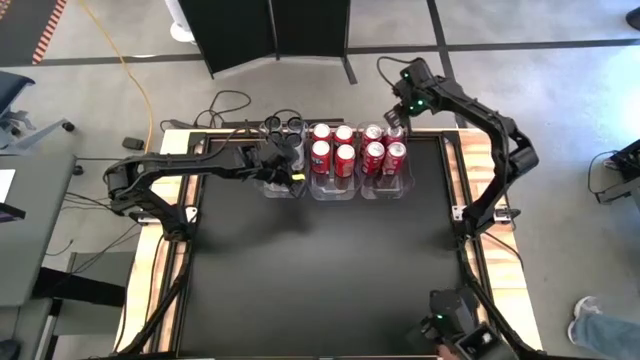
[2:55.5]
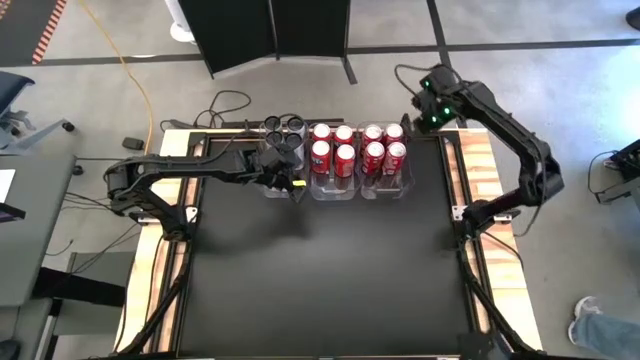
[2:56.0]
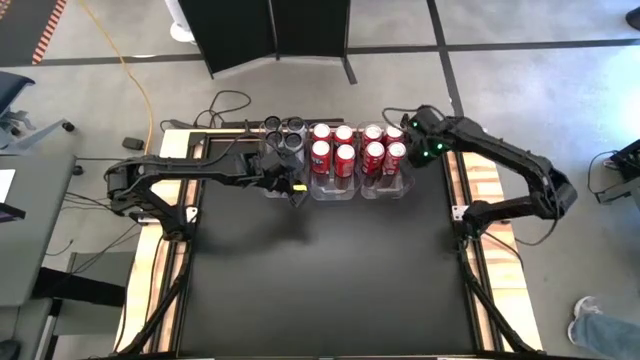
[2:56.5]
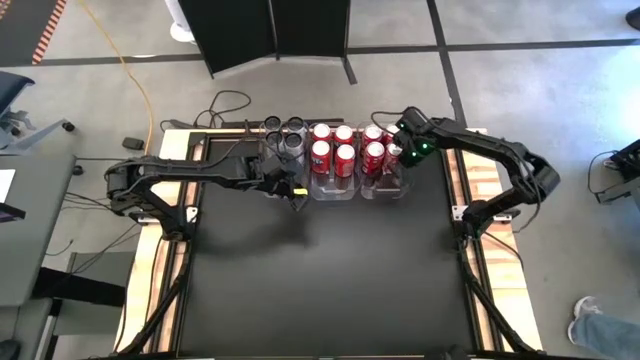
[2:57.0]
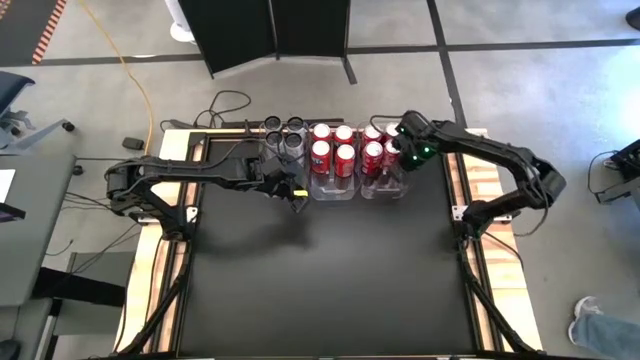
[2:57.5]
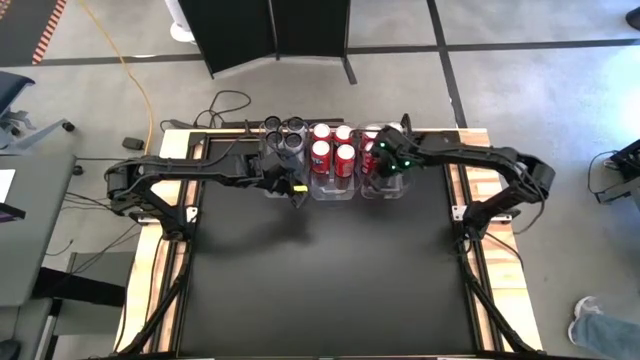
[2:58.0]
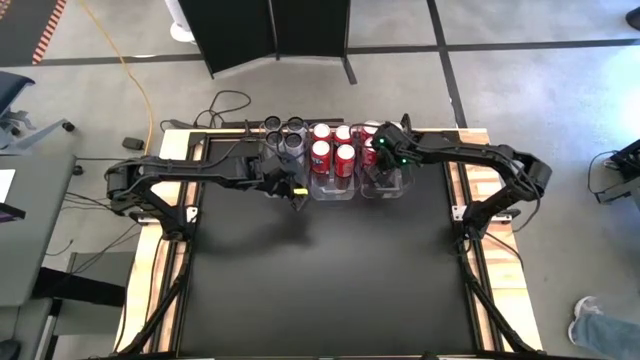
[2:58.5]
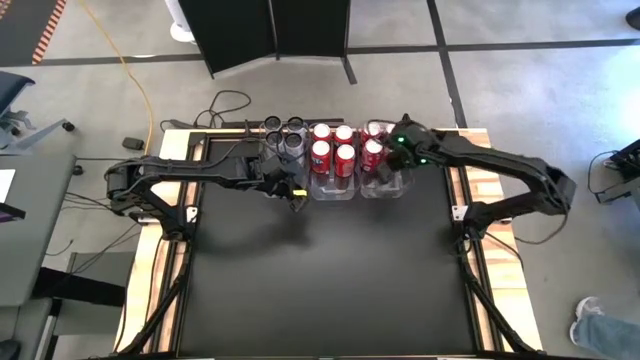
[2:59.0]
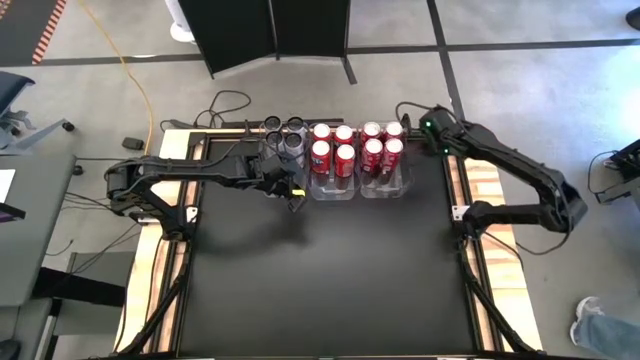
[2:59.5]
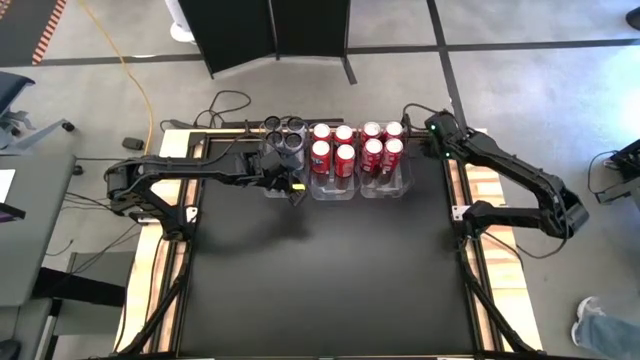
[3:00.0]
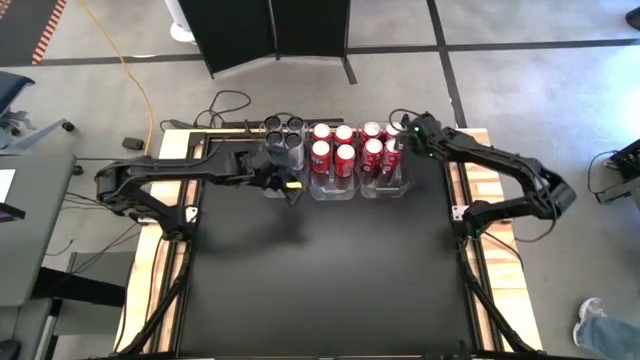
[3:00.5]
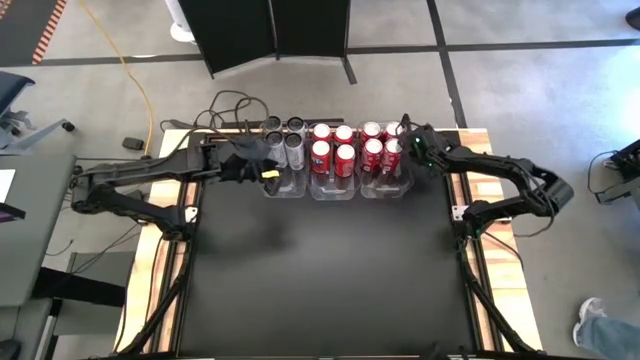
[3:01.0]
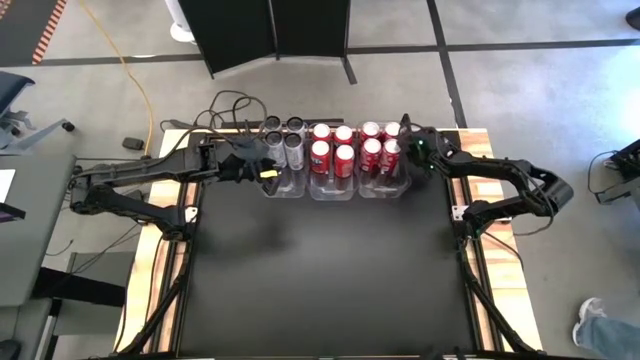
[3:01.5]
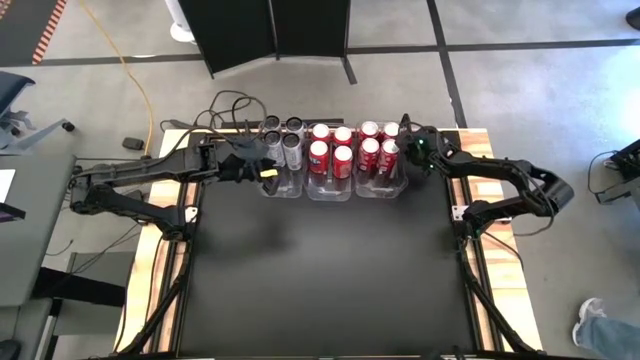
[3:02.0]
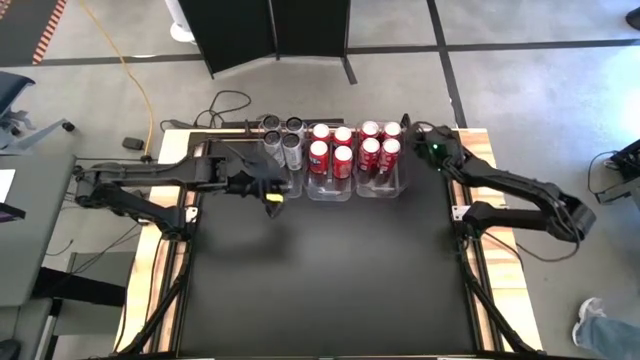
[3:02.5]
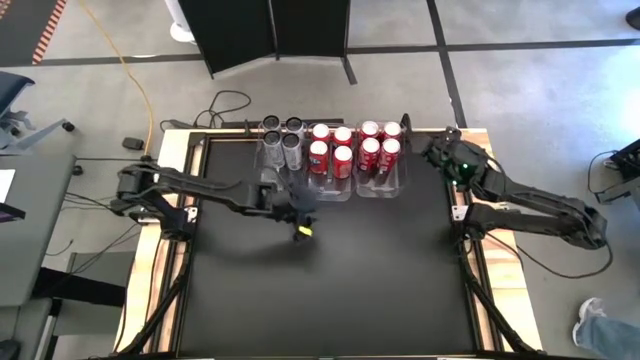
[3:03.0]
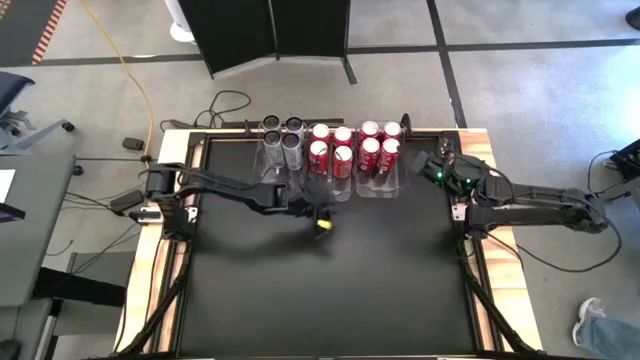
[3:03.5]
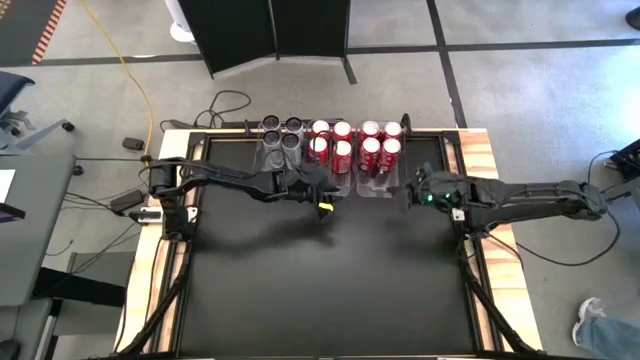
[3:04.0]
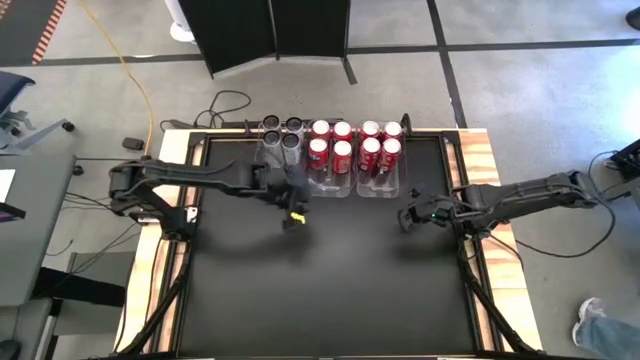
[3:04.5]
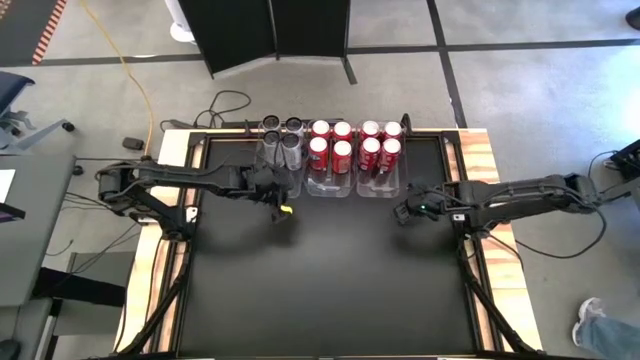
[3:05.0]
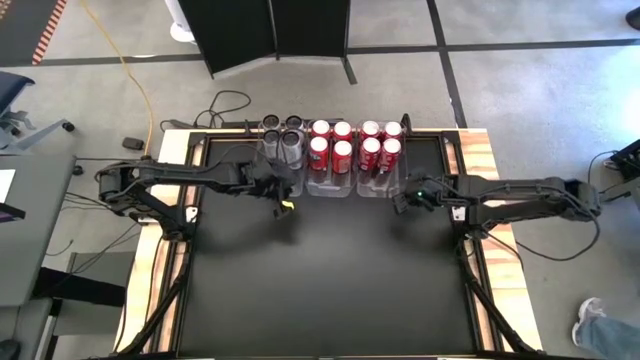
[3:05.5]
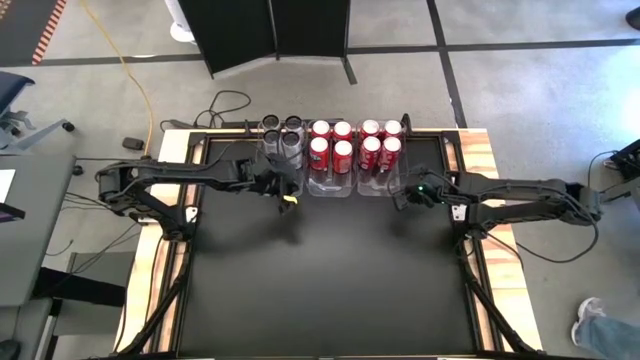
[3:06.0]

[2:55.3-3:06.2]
Task: Sort soda cans
Adjust the transparent bins to align them on the table

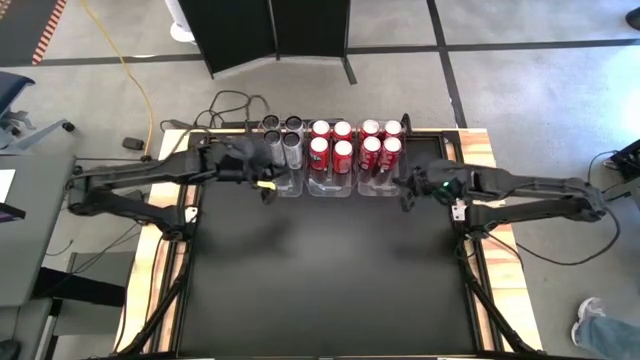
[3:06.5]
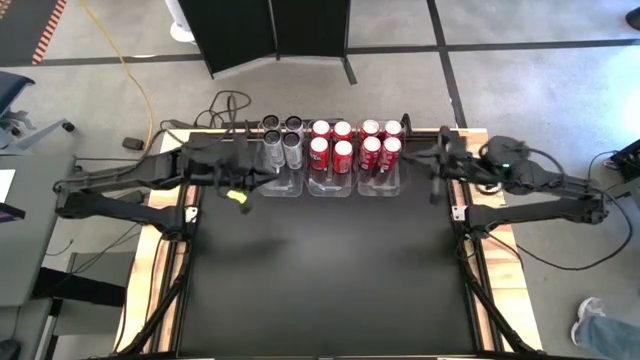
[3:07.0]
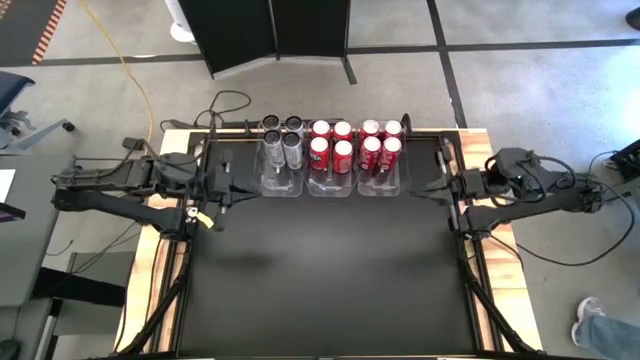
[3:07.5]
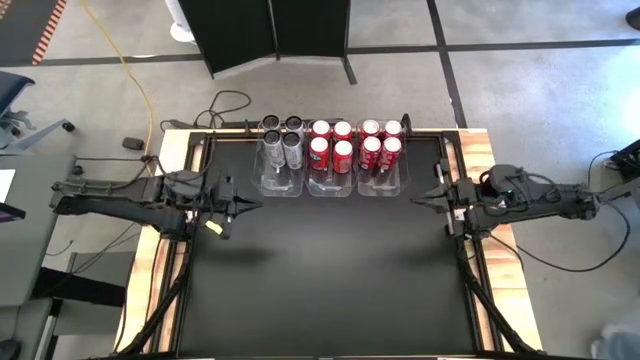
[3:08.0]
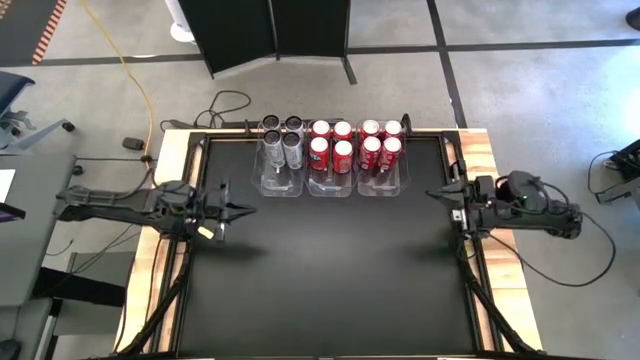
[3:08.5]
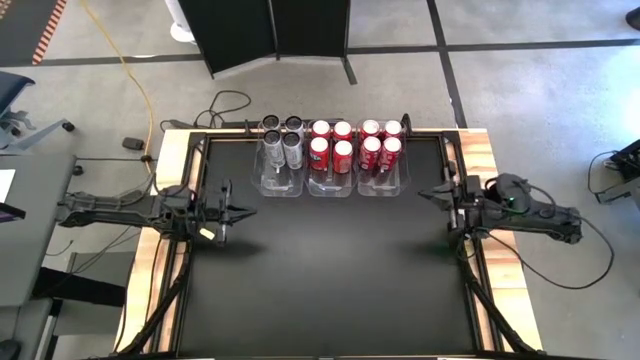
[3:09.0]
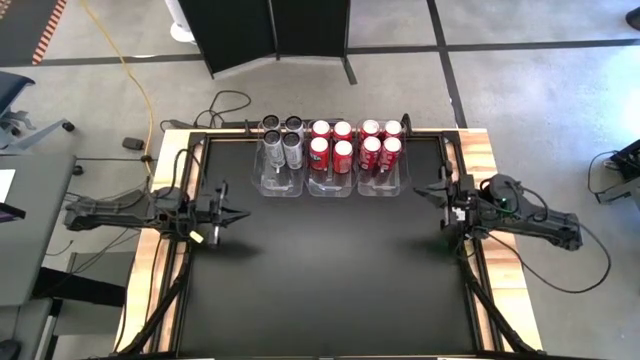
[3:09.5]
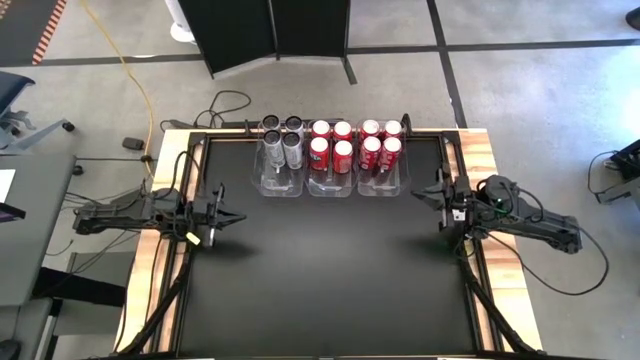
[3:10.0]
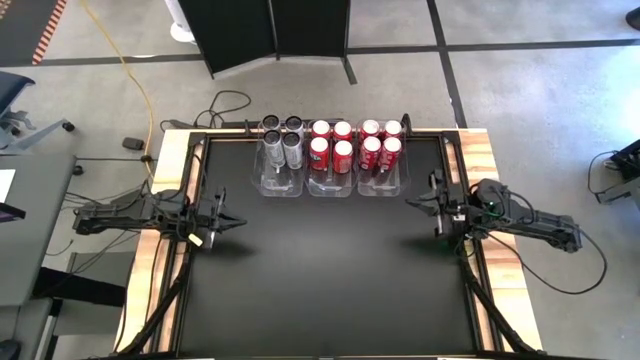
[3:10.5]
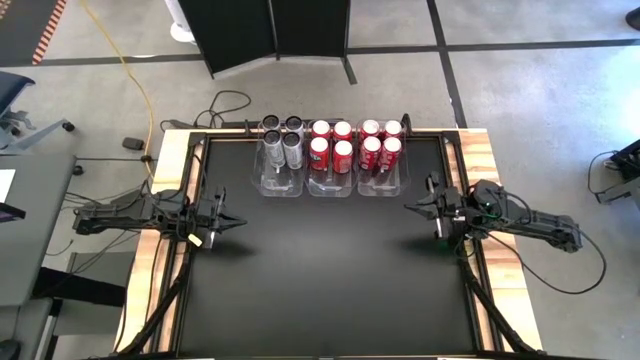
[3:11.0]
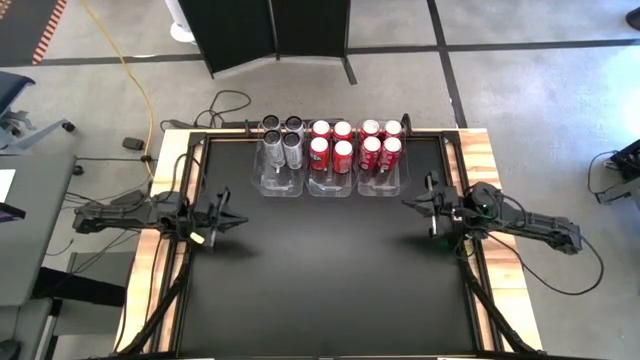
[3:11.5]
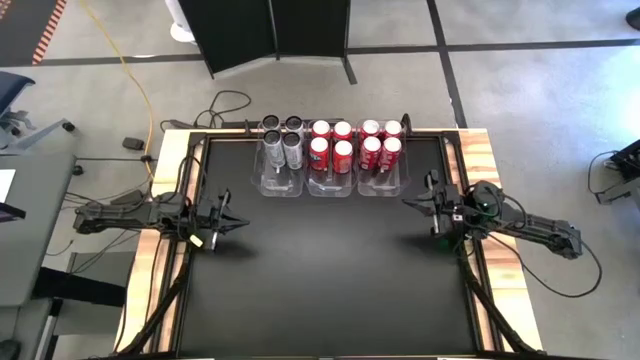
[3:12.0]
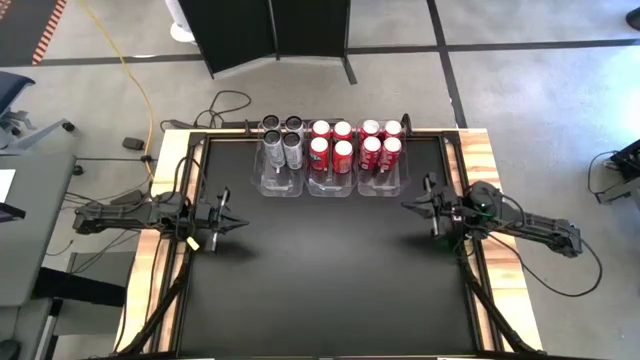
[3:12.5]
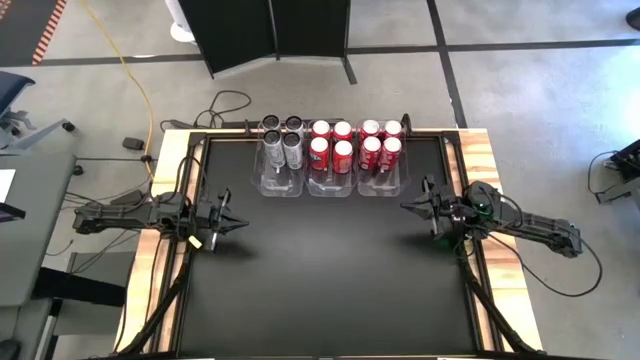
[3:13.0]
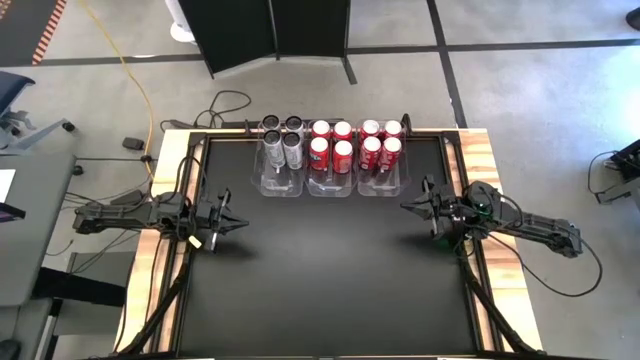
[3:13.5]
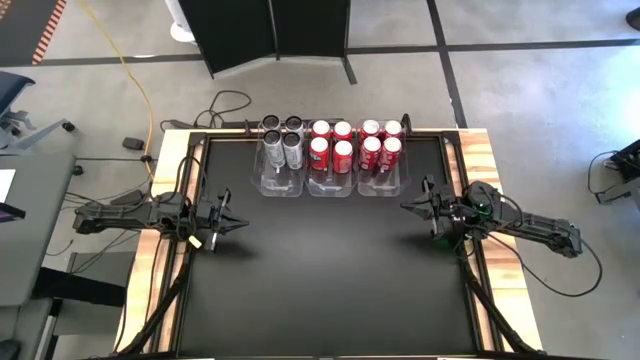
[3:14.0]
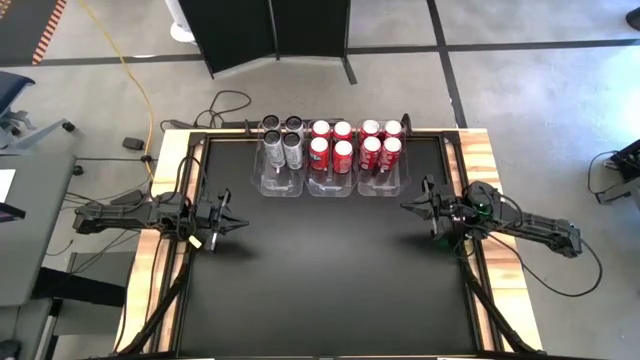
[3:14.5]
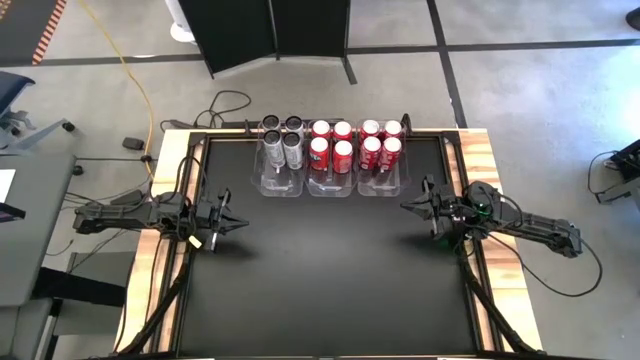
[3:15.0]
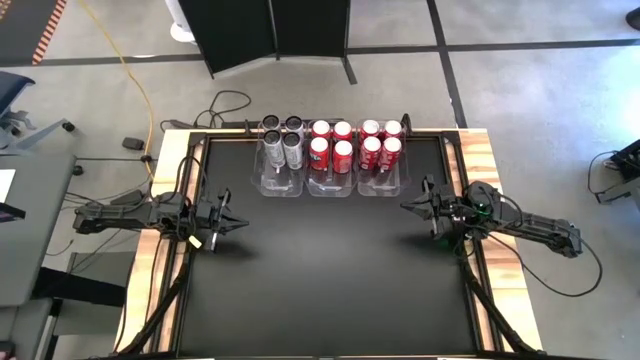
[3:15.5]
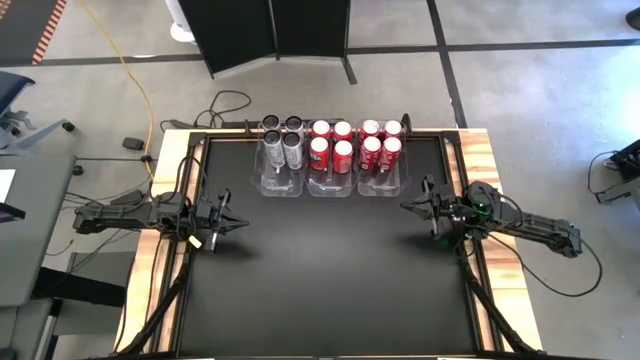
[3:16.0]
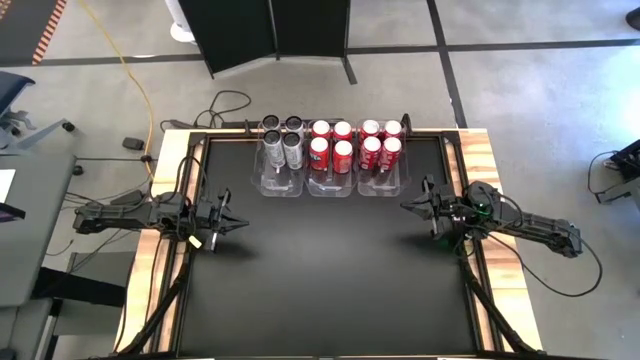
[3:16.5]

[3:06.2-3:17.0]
Return to Home Position
